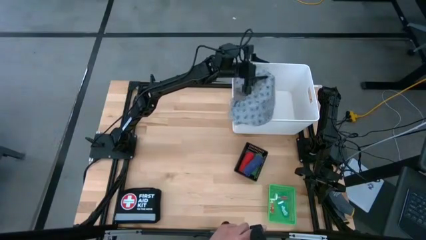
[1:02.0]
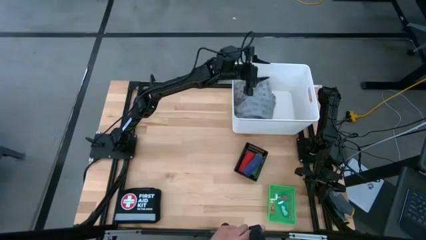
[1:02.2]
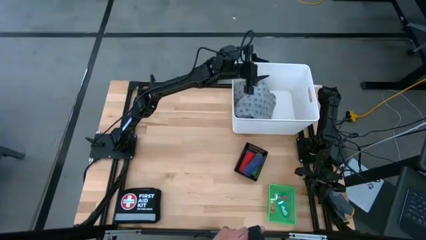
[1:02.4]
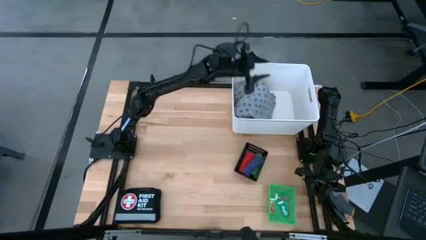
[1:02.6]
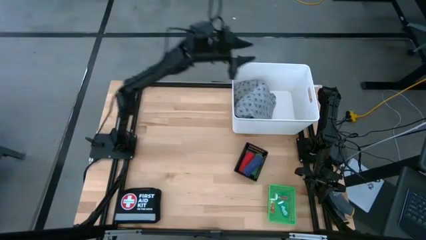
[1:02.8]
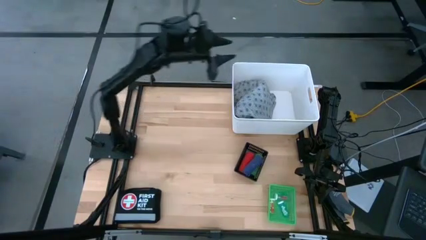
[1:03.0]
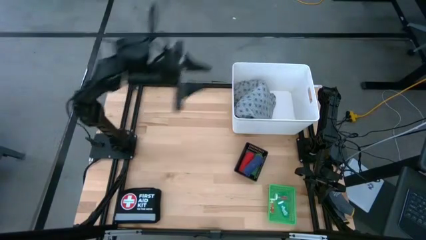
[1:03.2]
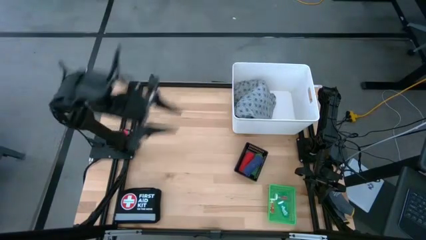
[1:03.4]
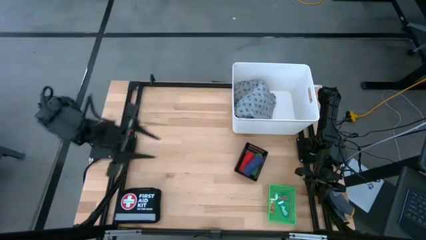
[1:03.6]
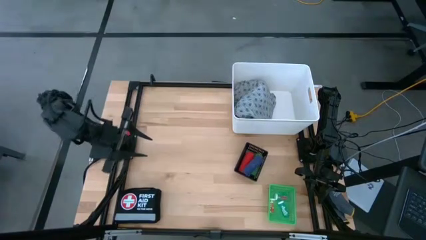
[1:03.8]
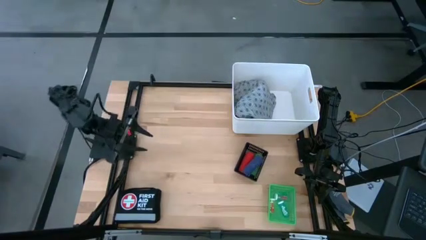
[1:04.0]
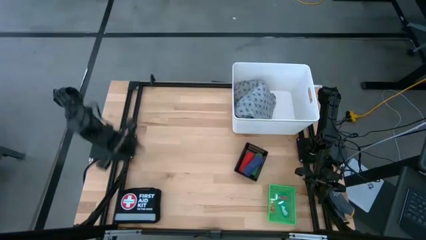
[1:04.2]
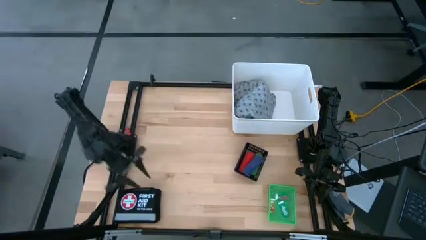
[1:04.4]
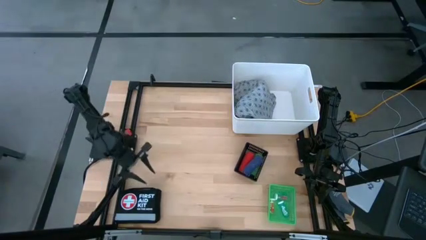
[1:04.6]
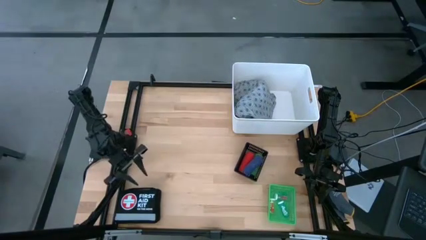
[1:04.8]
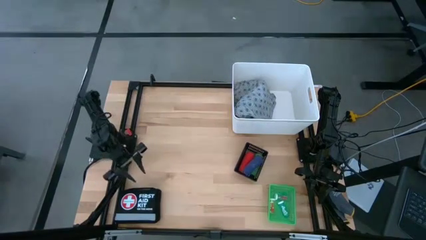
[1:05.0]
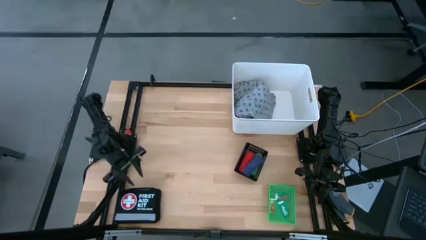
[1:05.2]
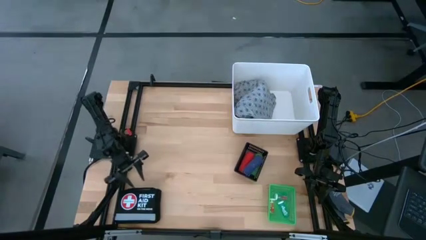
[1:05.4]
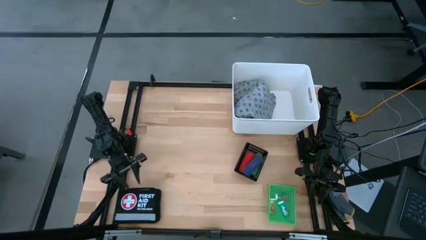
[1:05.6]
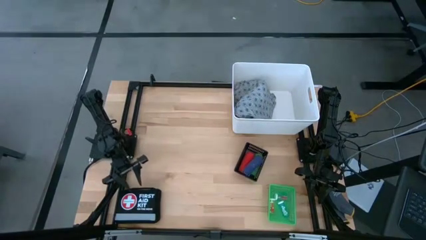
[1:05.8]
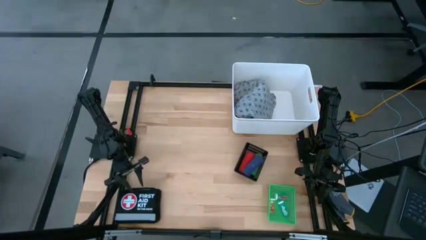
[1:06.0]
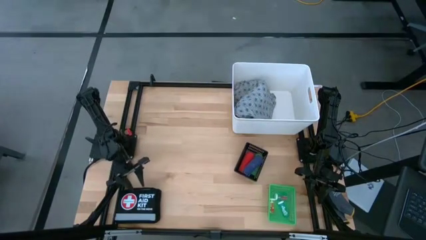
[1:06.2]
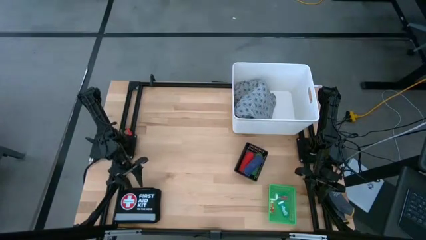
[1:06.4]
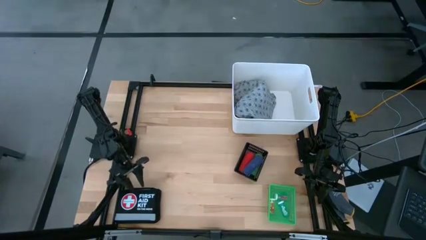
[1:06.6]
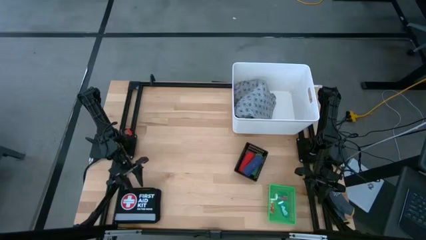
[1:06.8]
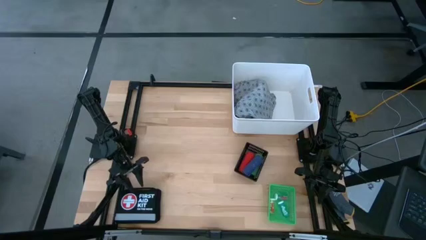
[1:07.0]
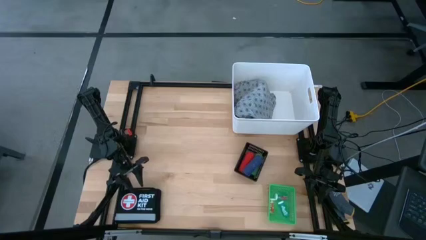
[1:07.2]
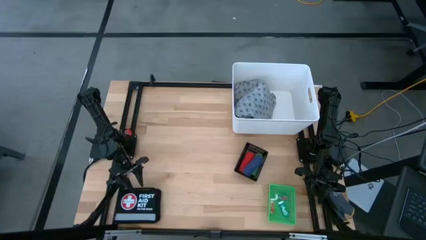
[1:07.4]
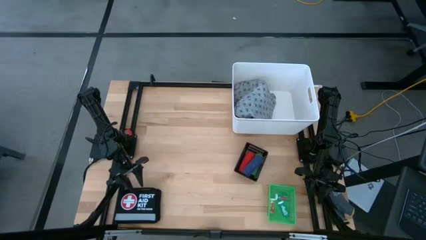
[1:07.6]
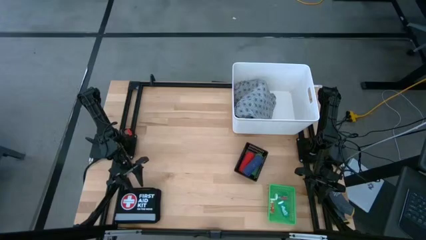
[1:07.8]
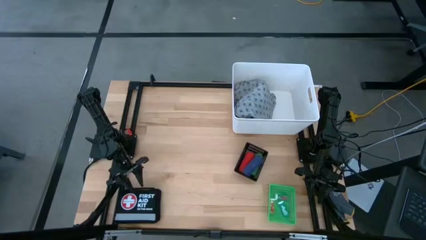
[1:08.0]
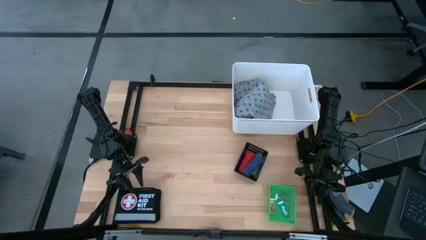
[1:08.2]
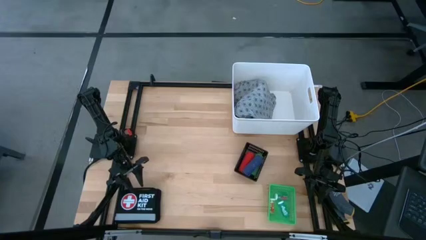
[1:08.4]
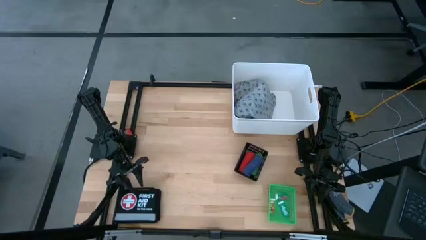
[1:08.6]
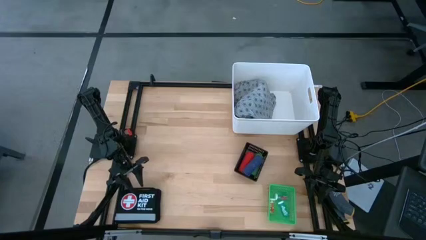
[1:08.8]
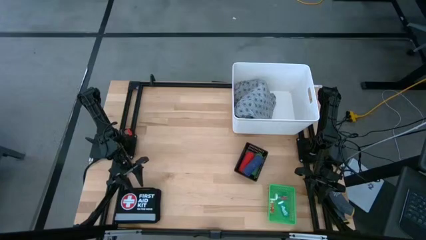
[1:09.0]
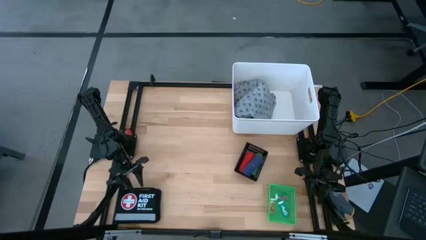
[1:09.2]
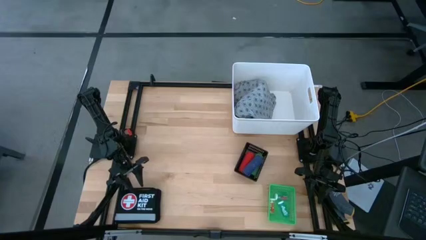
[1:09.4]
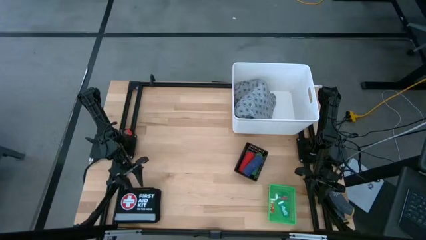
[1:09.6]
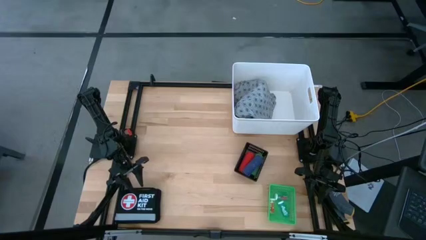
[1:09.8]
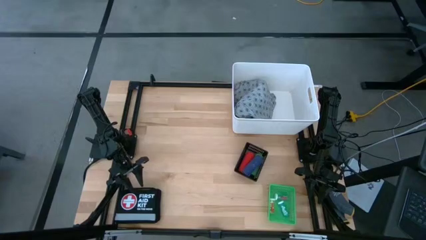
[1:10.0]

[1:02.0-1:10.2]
Task: Pick & place medical supplies in basket/bin
Return to Home Position

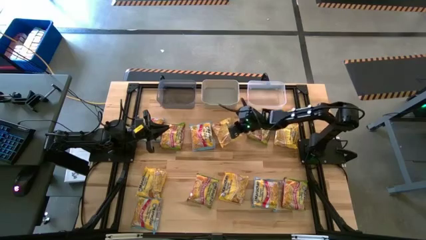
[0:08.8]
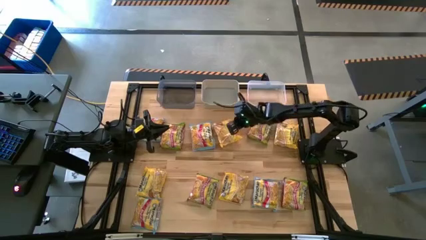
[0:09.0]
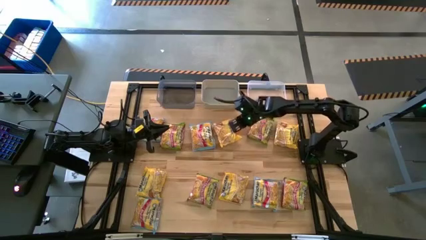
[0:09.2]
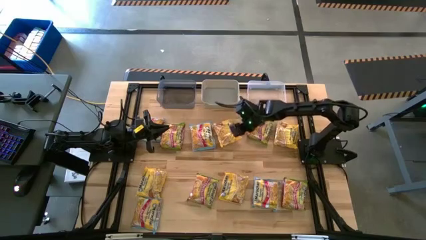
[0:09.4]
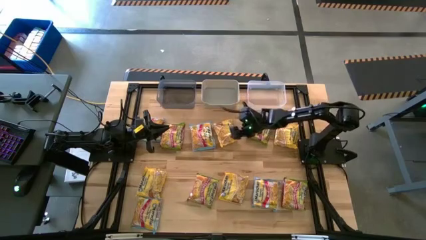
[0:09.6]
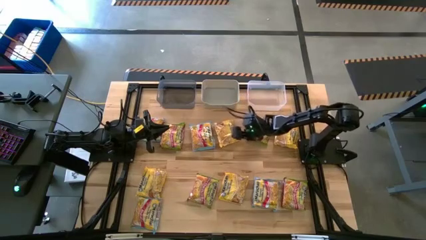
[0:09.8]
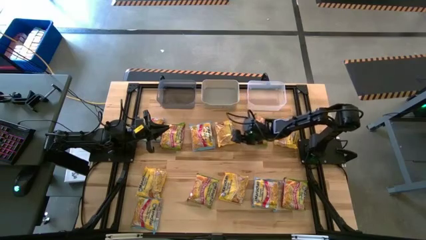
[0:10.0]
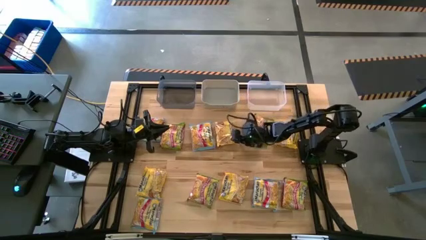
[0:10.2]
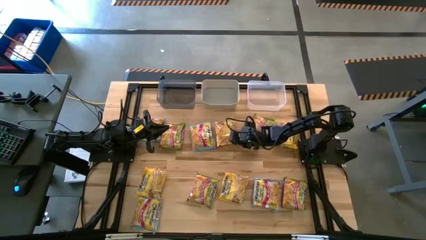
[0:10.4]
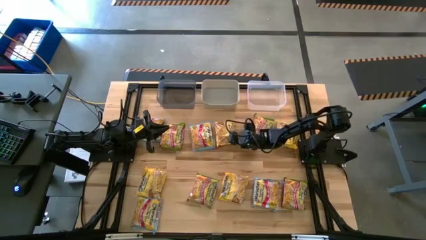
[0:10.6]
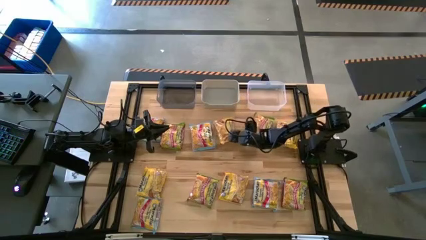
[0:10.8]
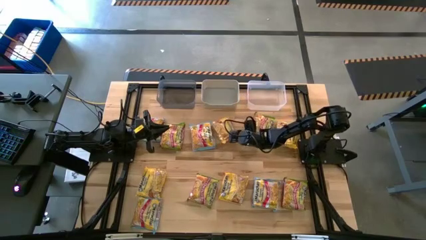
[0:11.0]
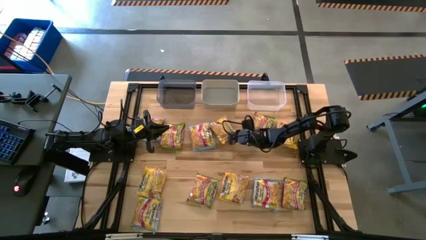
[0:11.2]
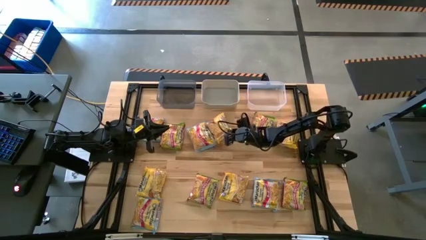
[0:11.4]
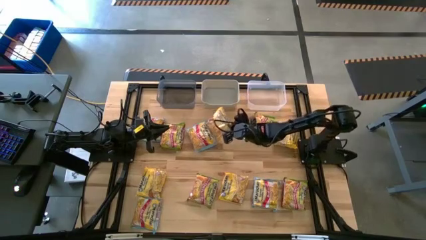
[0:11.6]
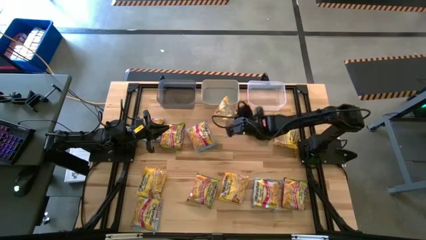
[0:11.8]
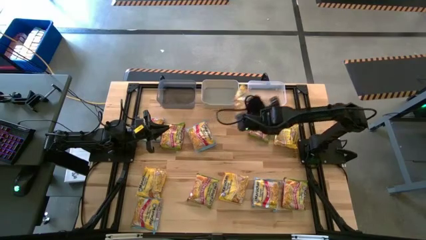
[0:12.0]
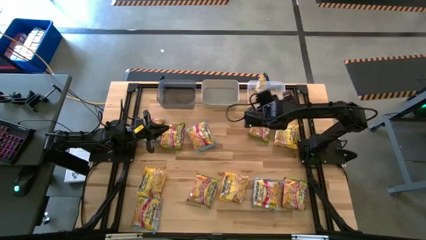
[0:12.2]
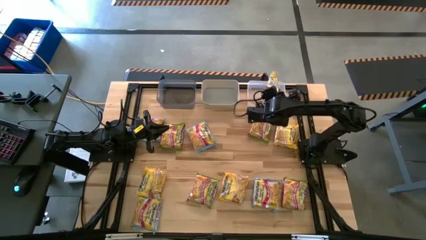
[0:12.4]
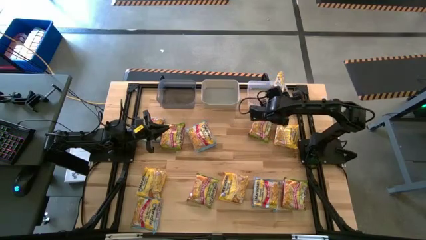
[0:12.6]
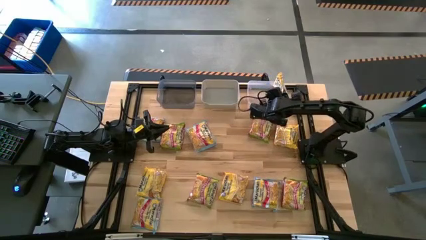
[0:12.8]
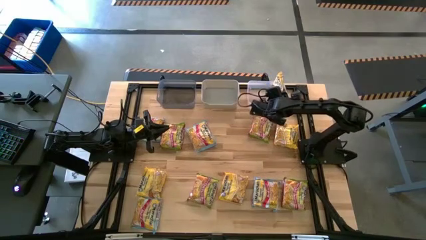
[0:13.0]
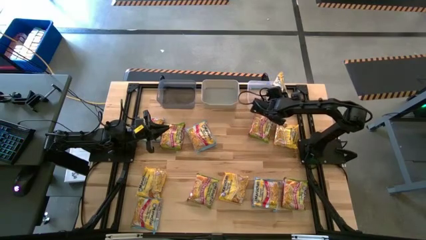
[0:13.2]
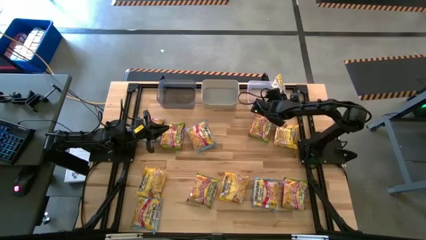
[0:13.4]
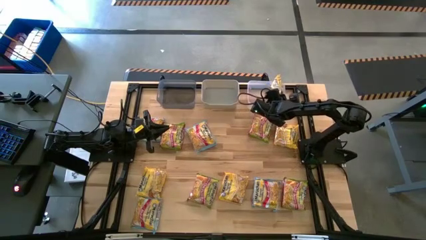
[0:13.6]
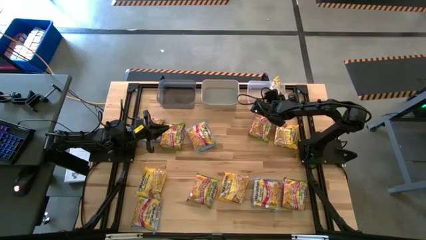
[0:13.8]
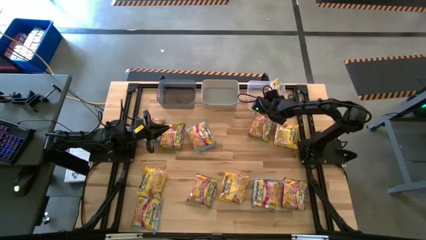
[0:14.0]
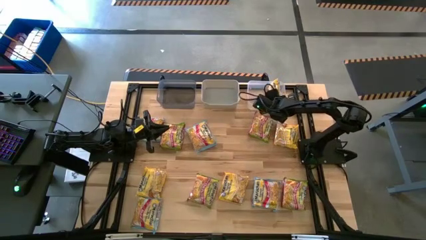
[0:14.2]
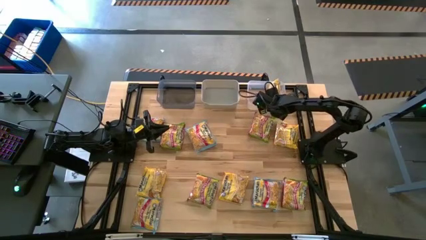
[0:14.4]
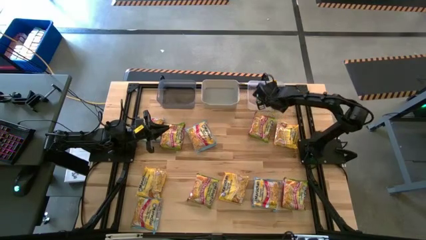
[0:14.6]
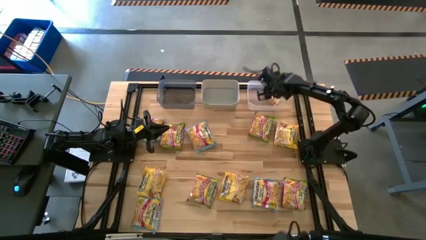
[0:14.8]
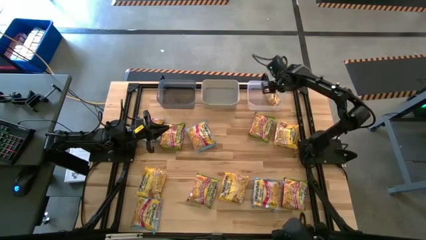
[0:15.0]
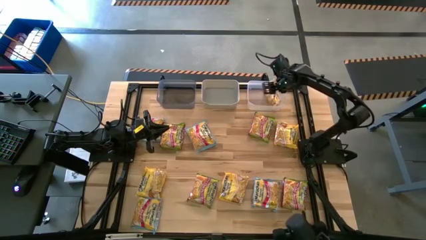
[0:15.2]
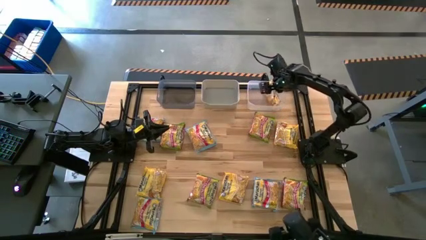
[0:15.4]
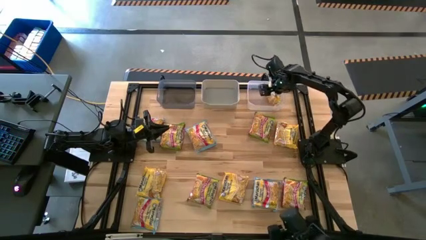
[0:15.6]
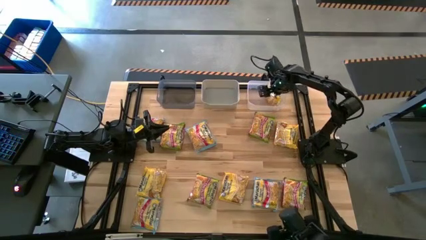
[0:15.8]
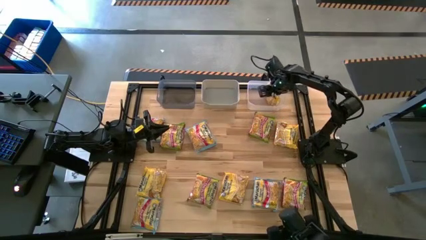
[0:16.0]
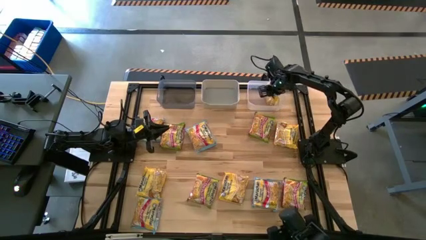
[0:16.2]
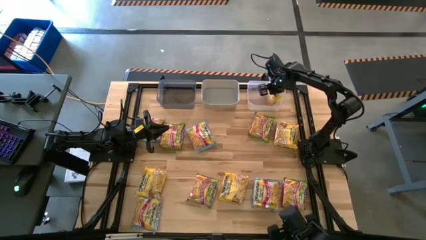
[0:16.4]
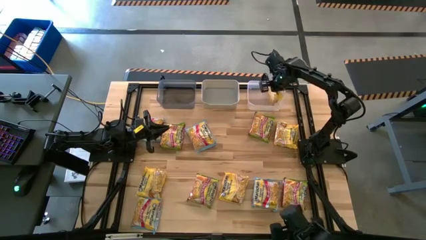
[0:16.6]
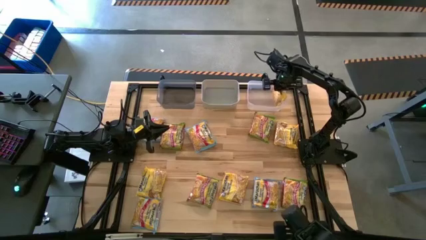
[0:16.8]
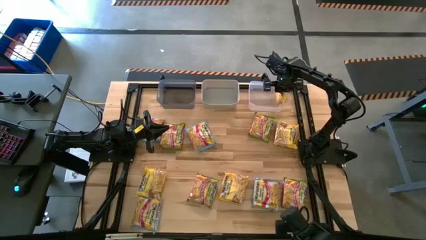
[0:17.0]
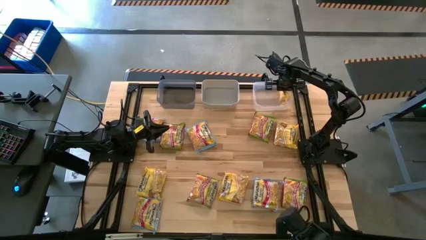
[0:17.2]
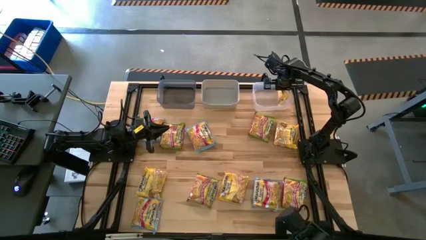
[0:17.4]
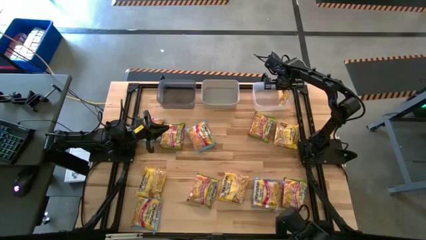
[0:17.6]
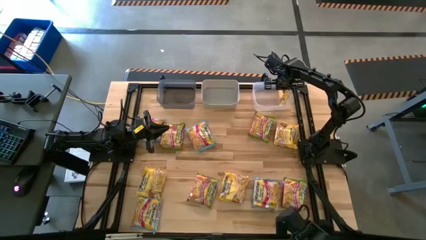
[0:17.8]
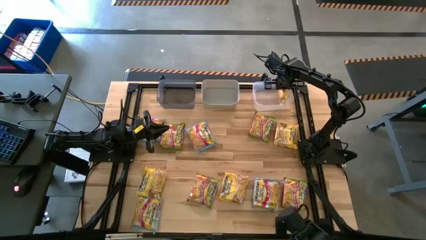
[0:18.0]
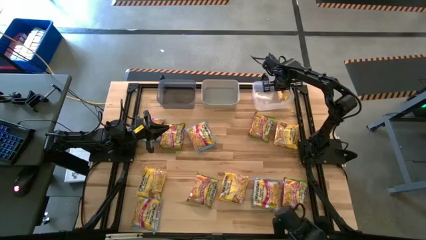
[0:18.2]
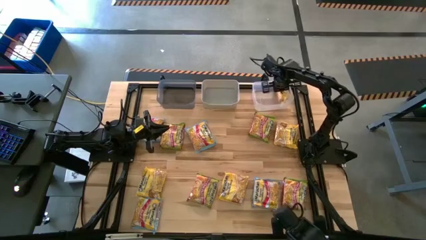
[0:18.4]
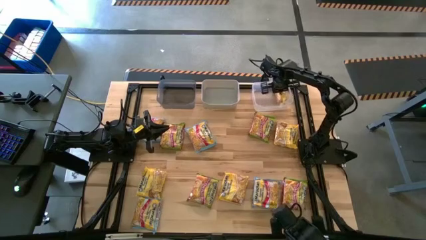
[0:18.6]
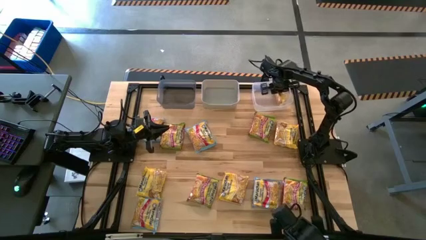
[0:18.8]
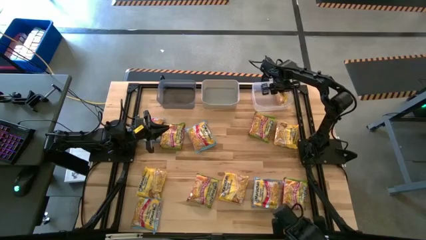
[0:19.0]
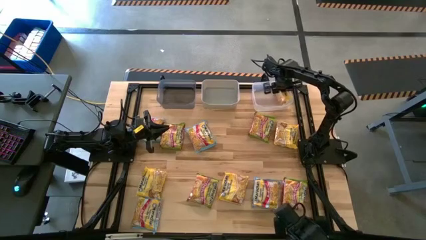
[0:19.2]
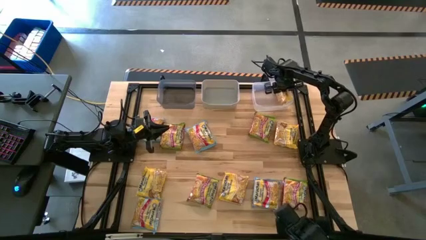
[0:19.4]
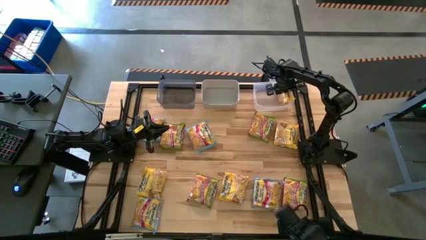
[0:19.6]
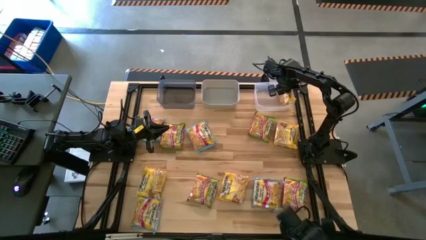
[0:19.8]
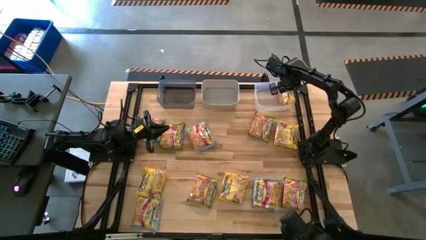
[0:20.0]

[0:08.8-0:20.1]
Task: Sort Maruchan noodles
Put the yellow noodle pack into the transparent bin
